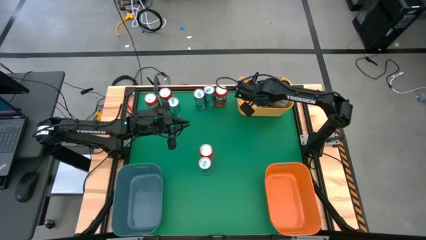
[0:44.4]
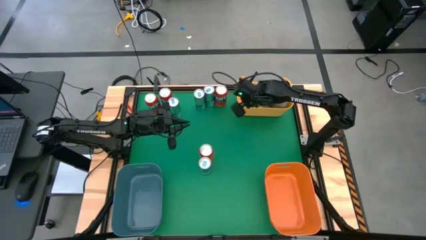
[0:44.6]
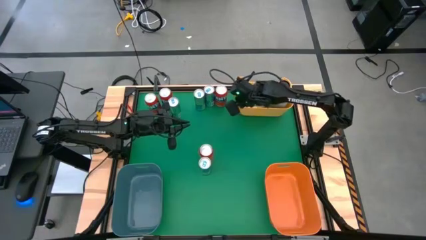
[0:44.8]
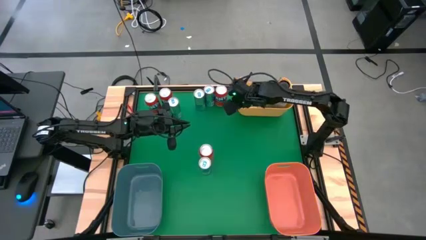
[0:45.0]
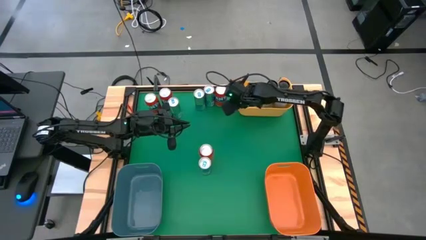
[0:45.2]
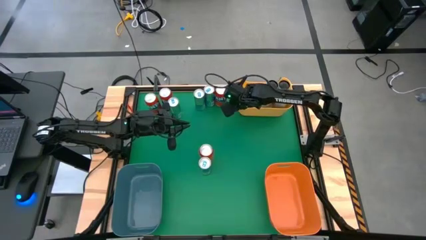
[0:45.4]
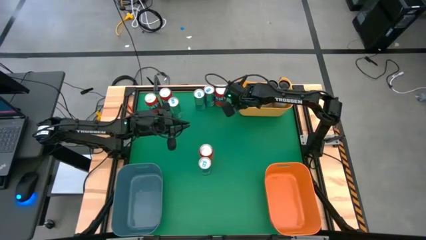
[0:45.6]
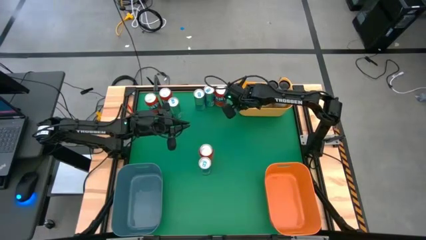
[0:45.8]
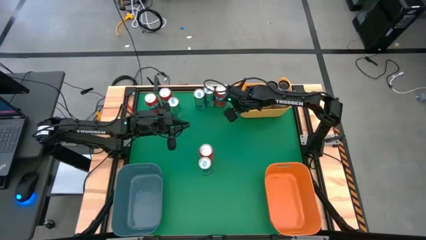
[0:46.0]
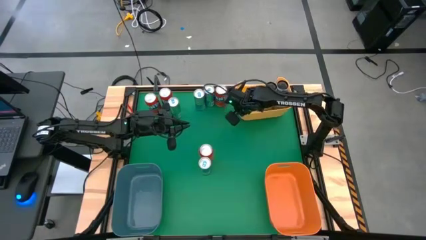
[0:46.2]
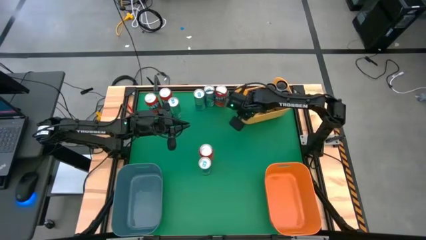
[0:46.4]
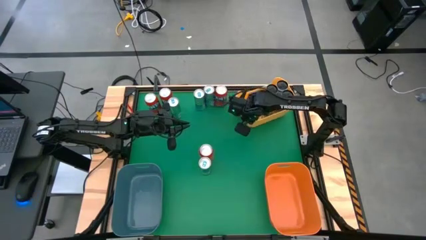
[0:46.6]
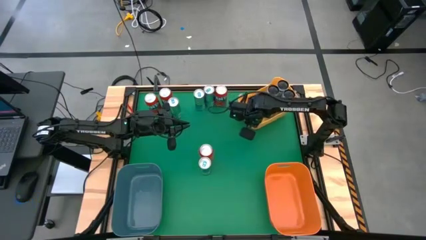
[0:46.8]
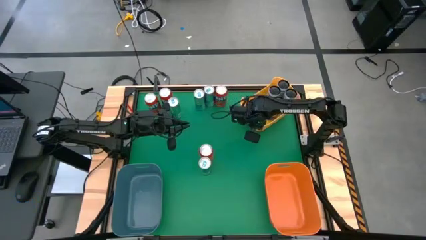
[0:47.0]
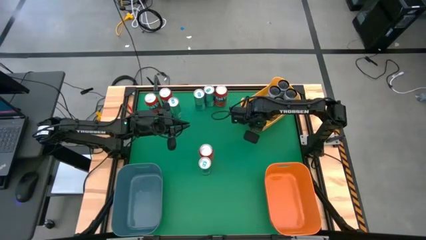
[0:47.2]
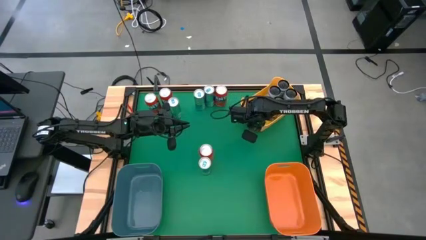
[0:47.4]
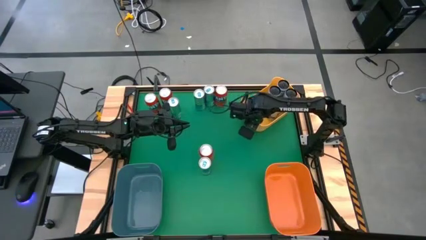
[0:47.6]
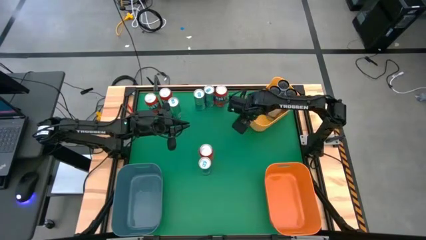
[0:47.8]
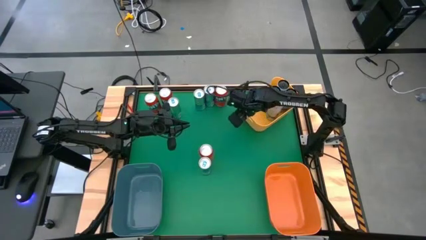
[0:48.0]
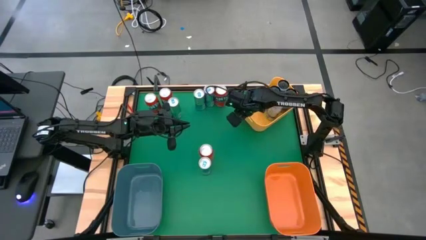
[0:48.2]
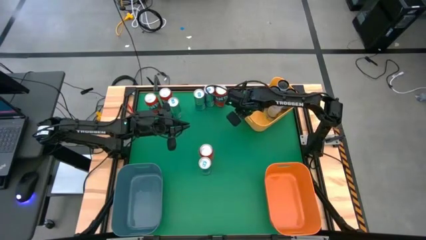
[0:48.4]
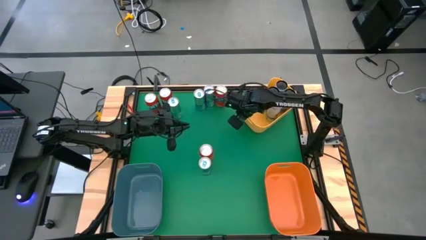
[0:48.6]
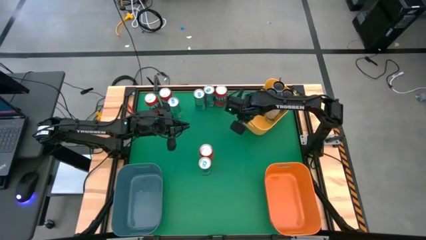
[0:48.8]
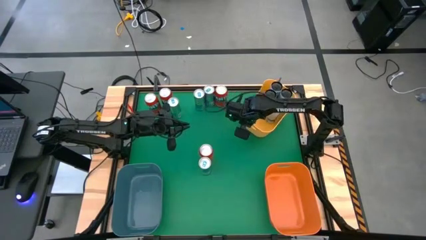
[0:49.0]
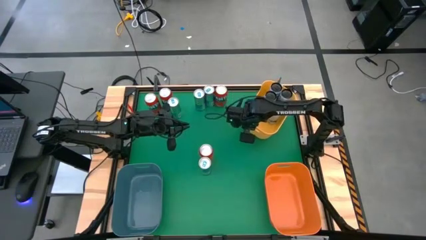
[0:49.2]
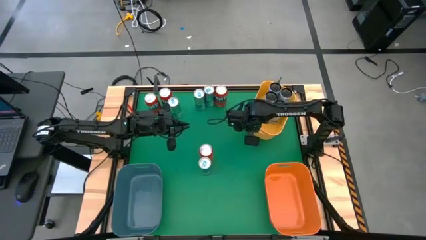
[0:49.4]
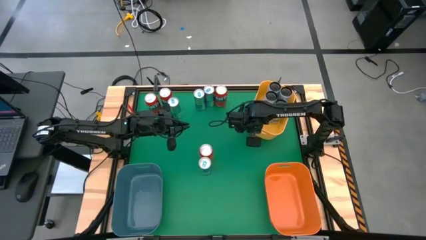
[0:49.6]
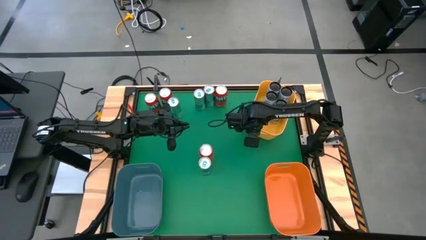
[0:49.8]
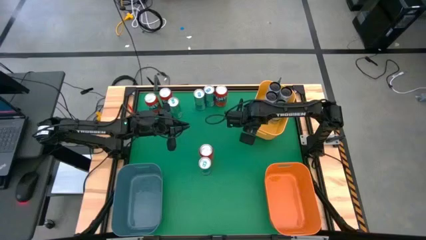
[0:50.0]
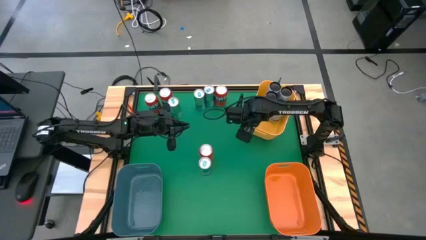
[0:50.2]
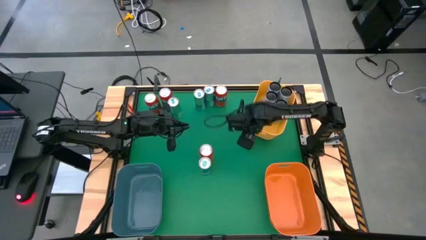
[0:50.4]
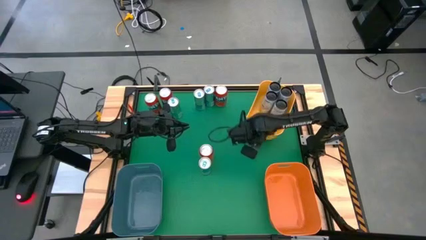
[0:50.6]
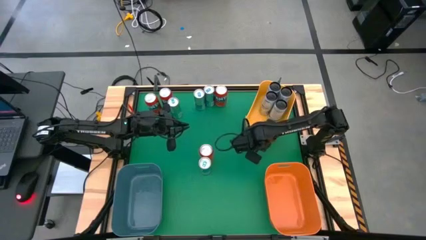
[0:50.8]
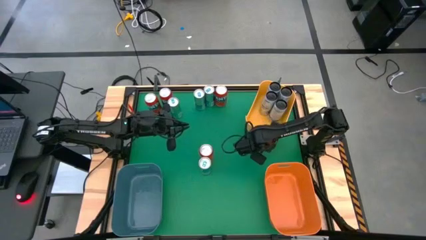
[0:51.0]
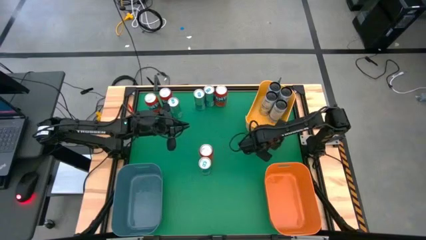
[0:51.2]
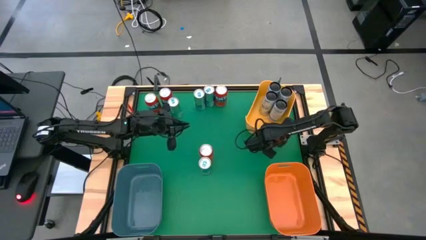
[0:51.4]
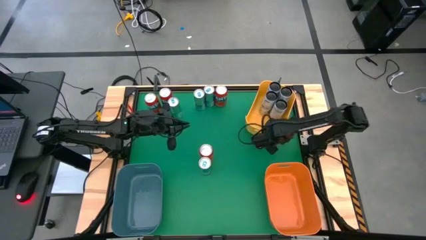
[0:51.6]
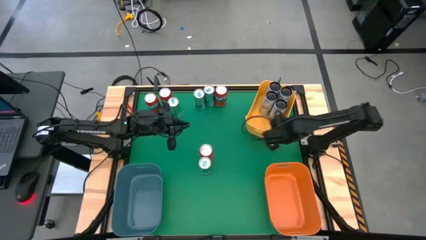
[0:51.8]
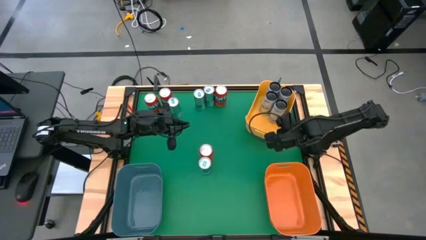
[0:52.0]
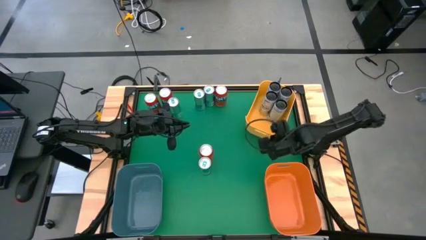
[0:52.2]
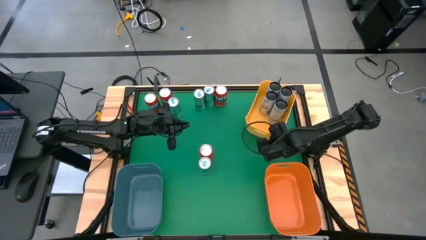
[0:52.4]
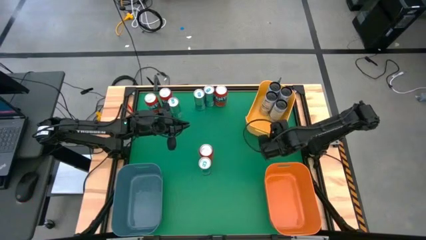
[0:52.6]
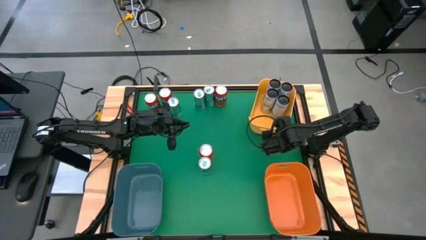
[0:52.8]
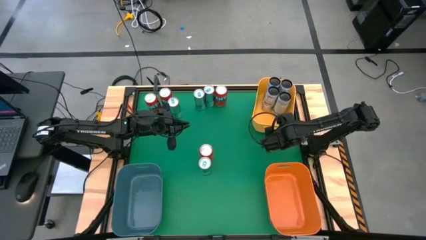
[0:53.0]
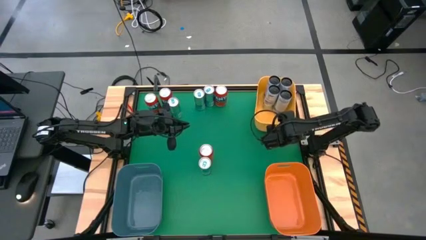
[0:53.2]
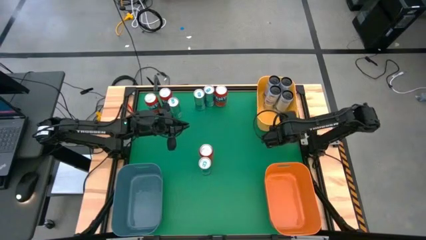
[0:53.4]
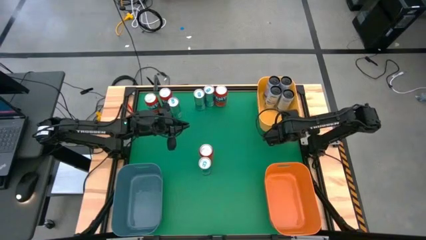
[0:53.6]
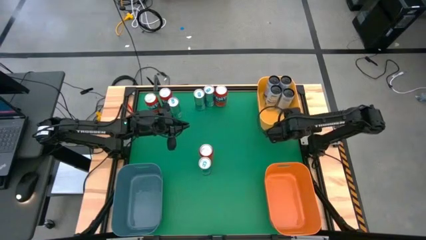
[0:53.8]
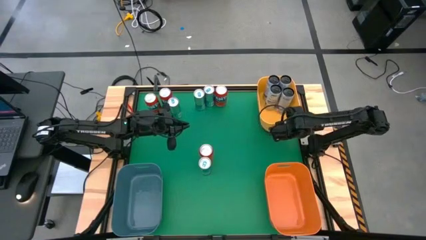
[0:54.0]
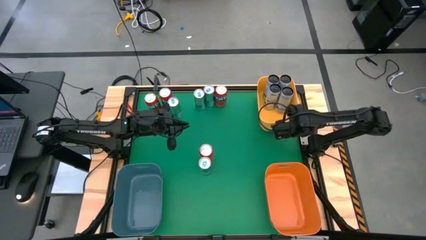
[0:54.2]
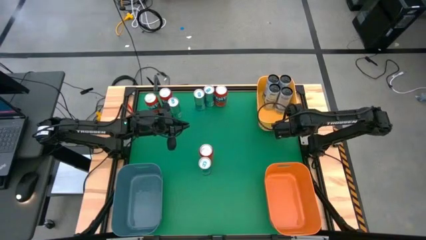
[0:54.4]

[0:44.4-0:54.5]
Task: Sort soda cans
Adjust the yellow bin
